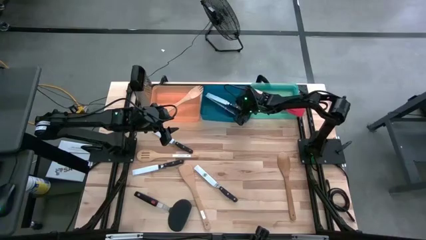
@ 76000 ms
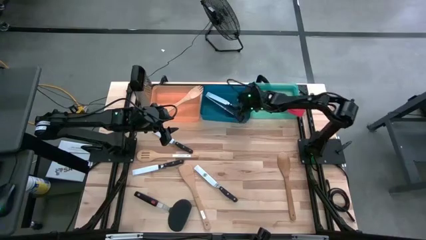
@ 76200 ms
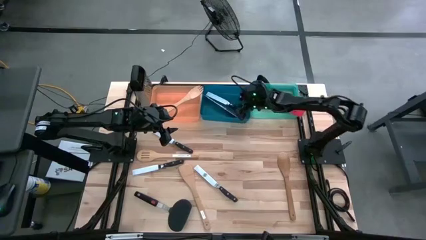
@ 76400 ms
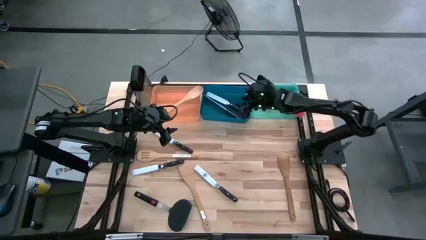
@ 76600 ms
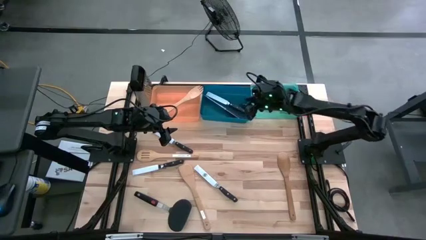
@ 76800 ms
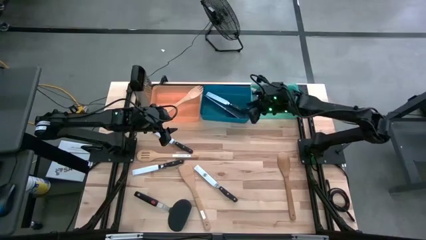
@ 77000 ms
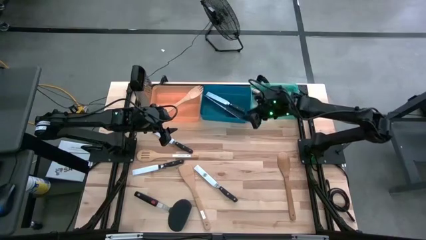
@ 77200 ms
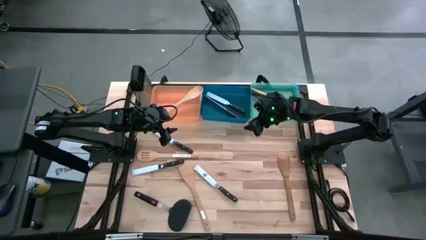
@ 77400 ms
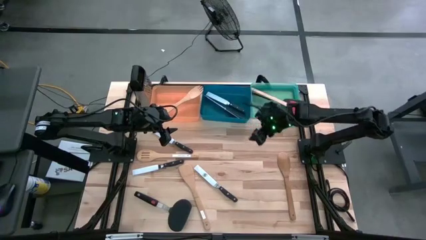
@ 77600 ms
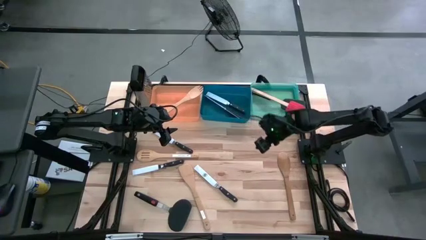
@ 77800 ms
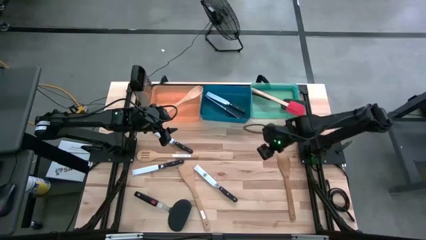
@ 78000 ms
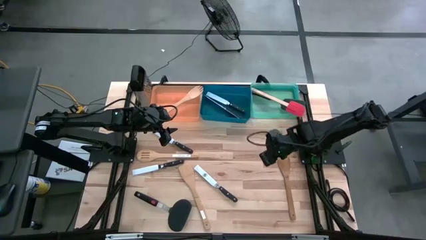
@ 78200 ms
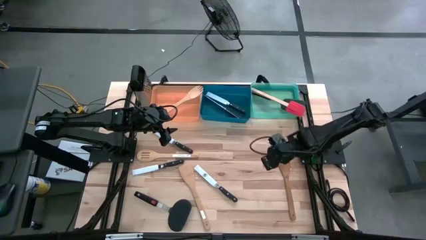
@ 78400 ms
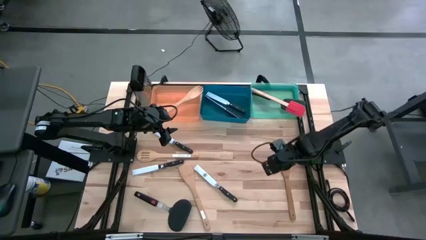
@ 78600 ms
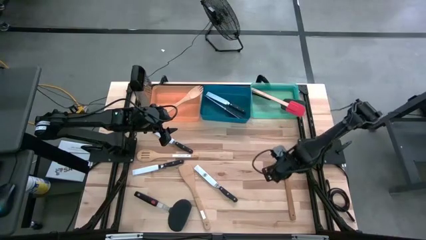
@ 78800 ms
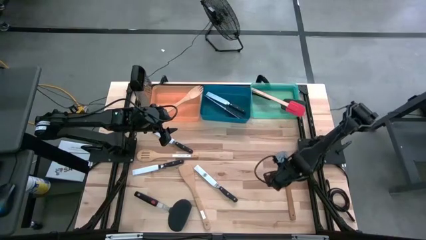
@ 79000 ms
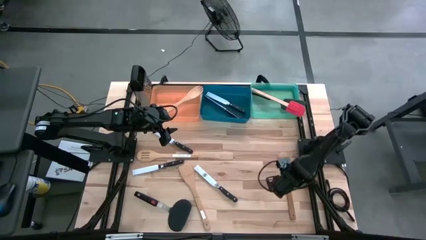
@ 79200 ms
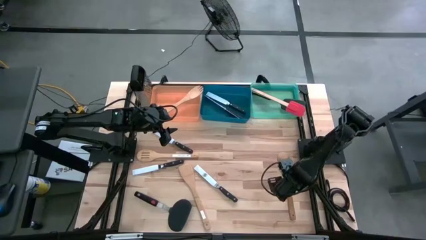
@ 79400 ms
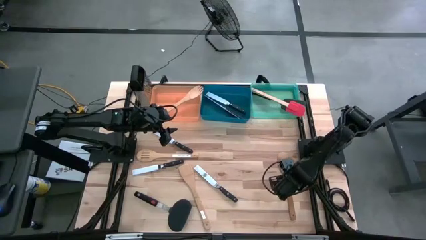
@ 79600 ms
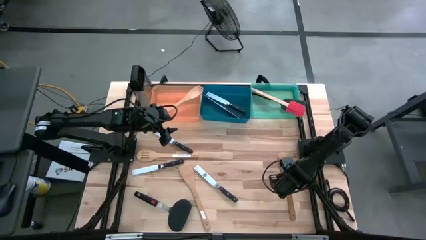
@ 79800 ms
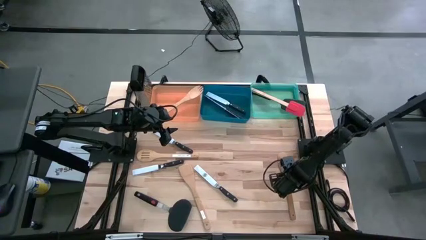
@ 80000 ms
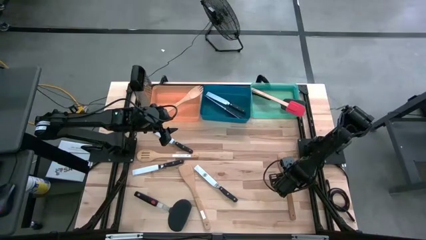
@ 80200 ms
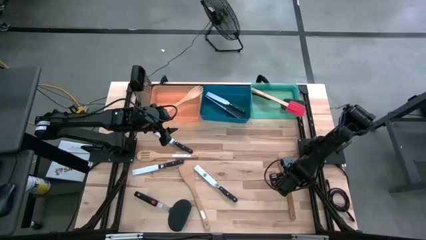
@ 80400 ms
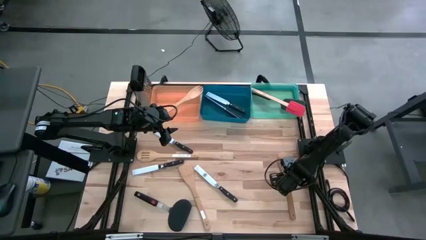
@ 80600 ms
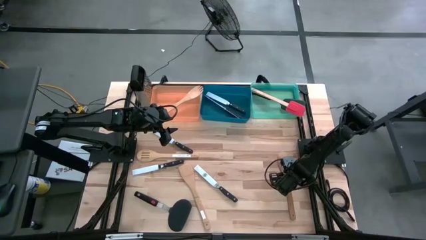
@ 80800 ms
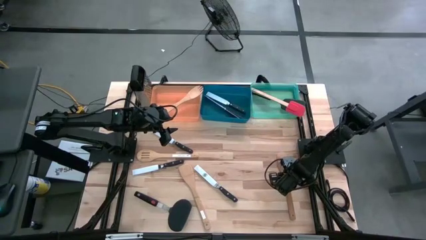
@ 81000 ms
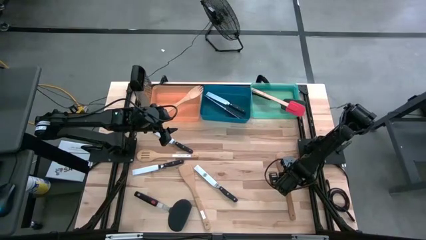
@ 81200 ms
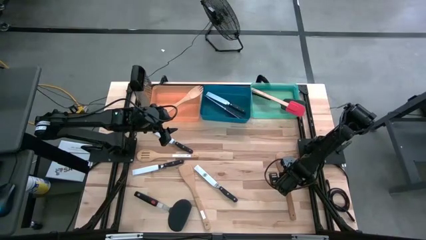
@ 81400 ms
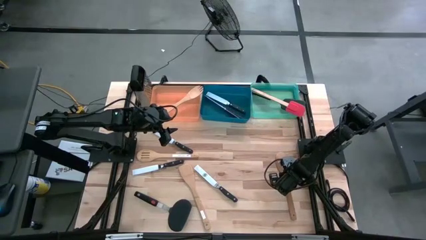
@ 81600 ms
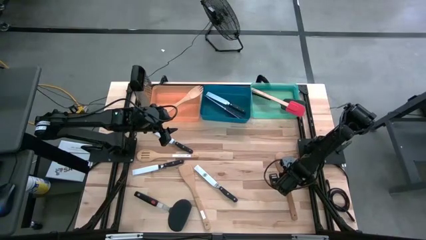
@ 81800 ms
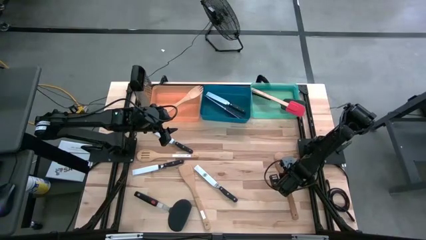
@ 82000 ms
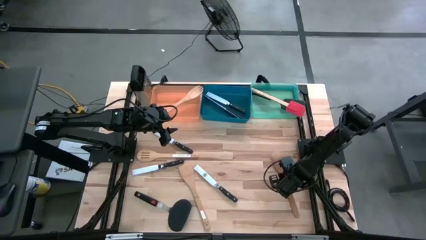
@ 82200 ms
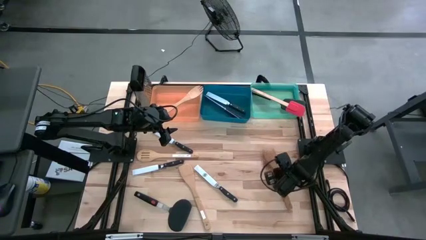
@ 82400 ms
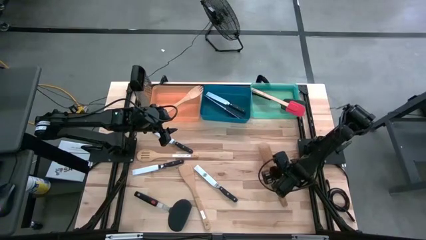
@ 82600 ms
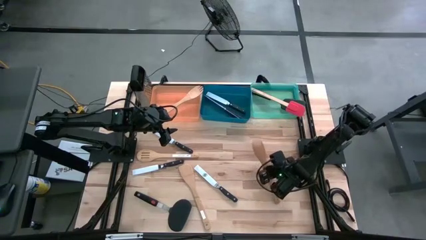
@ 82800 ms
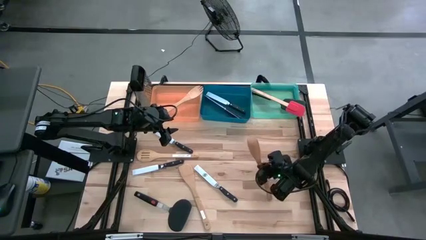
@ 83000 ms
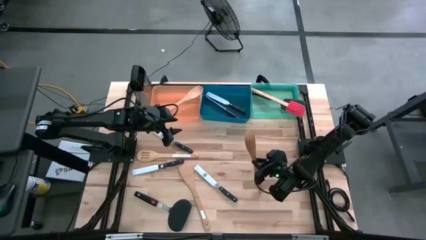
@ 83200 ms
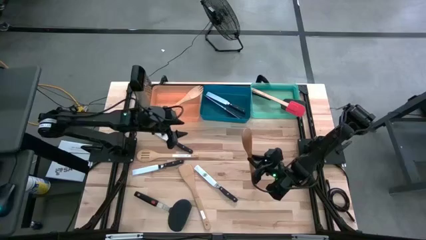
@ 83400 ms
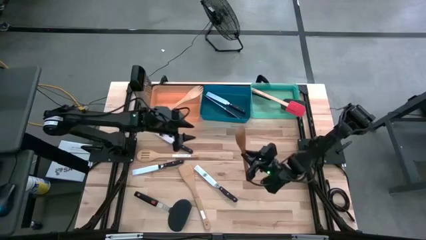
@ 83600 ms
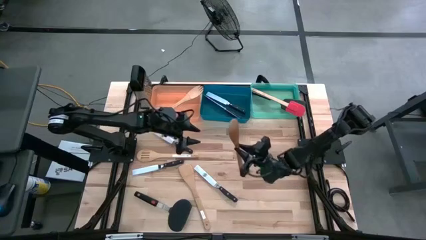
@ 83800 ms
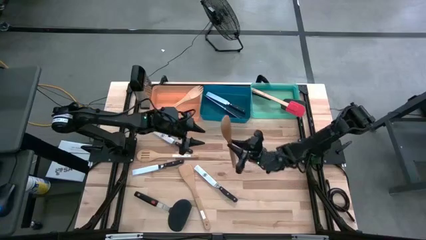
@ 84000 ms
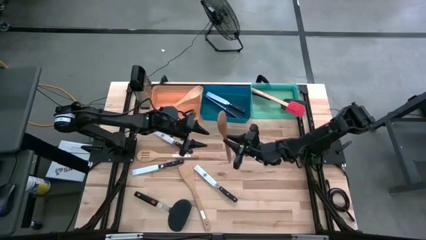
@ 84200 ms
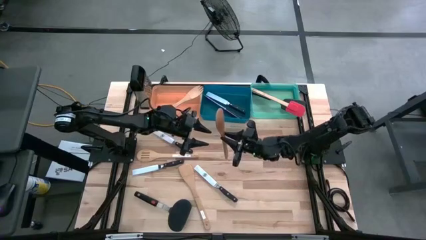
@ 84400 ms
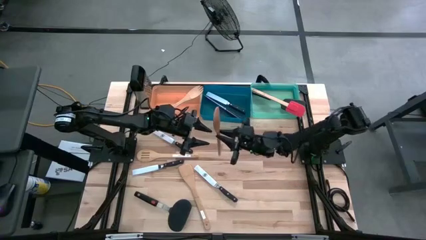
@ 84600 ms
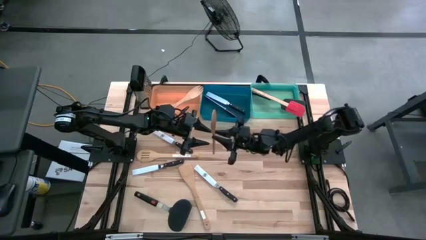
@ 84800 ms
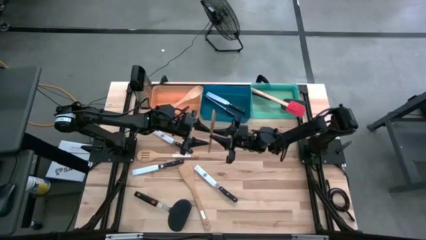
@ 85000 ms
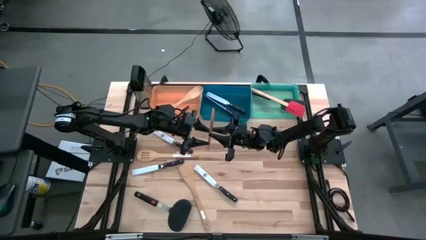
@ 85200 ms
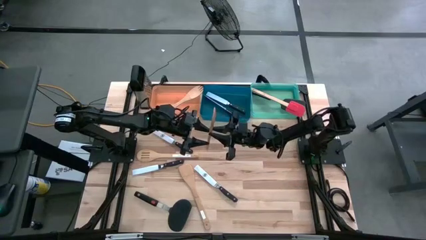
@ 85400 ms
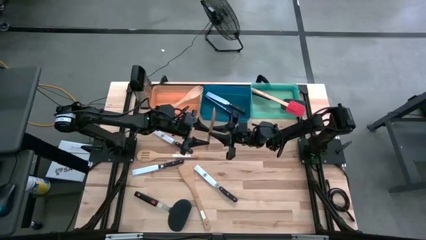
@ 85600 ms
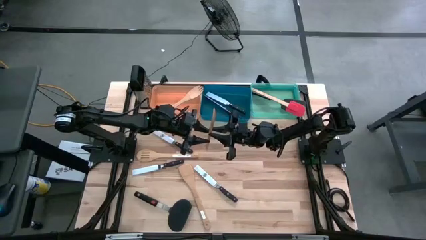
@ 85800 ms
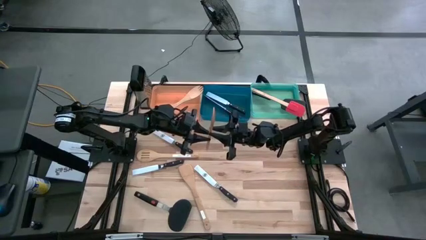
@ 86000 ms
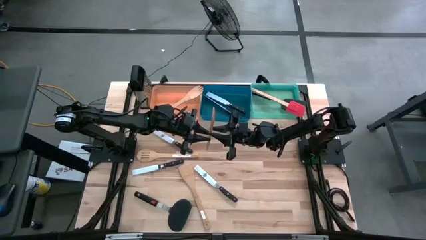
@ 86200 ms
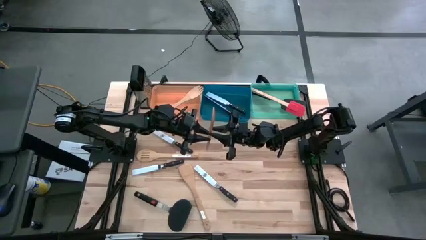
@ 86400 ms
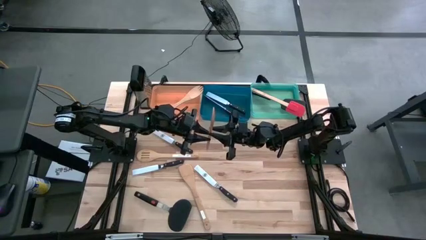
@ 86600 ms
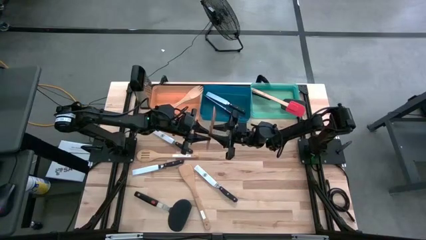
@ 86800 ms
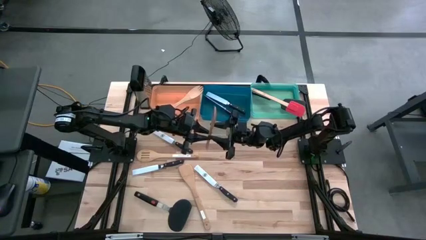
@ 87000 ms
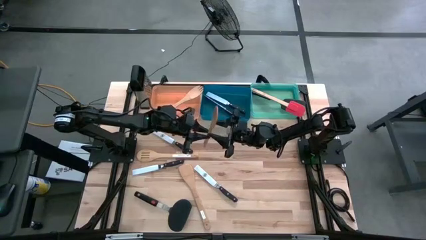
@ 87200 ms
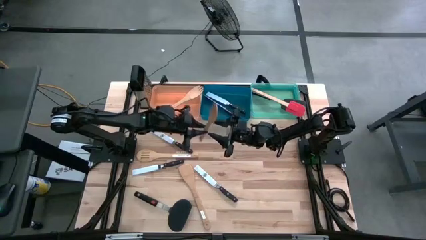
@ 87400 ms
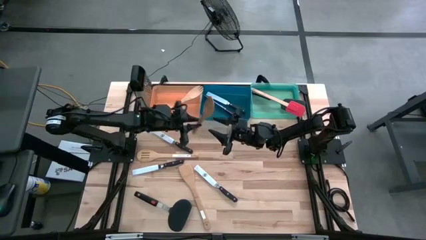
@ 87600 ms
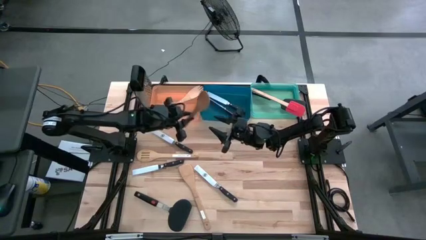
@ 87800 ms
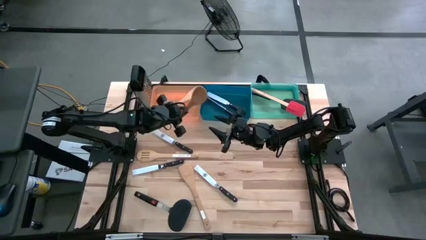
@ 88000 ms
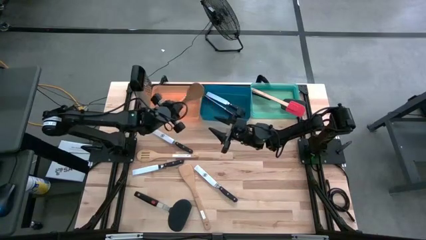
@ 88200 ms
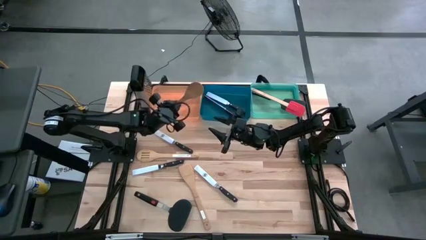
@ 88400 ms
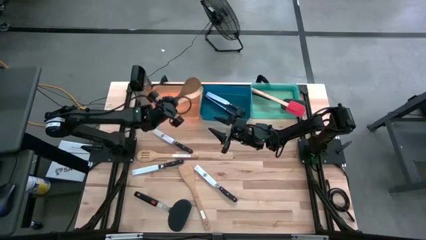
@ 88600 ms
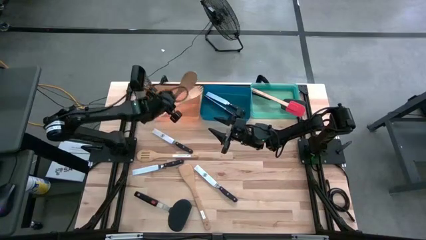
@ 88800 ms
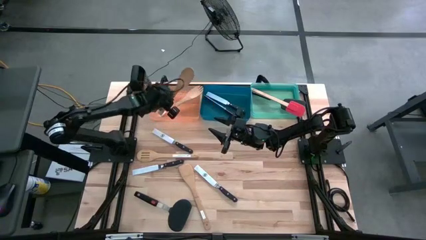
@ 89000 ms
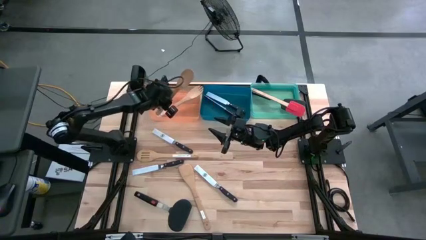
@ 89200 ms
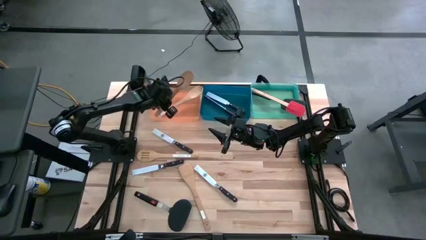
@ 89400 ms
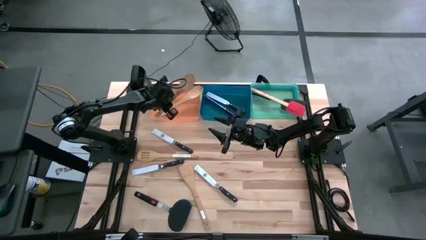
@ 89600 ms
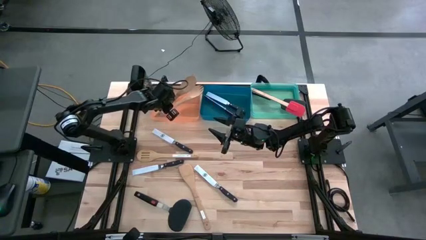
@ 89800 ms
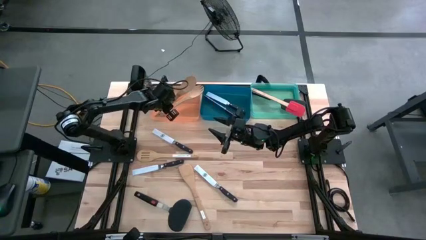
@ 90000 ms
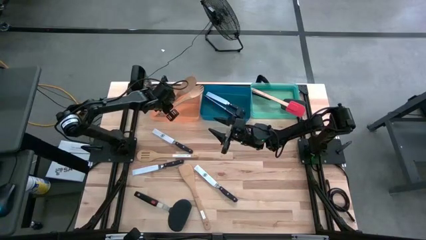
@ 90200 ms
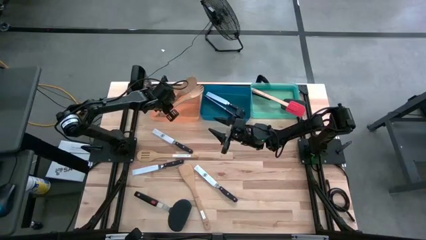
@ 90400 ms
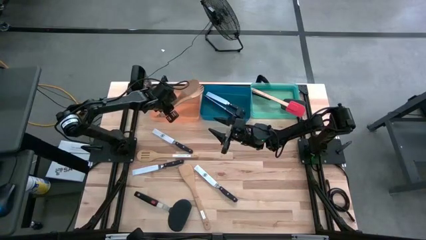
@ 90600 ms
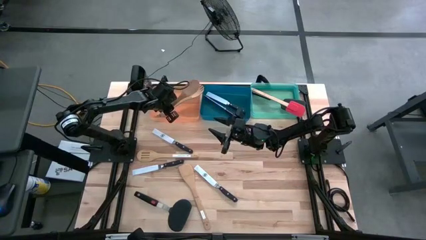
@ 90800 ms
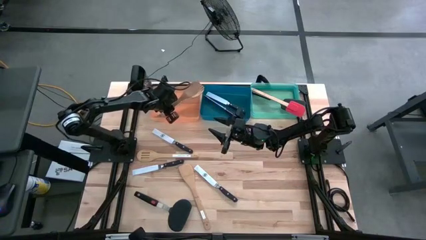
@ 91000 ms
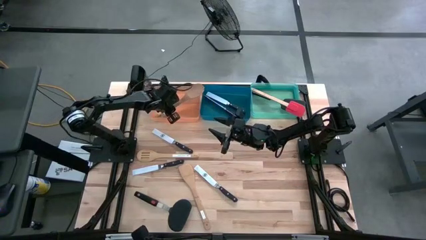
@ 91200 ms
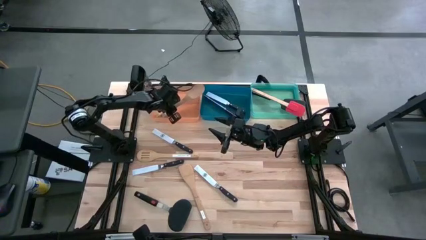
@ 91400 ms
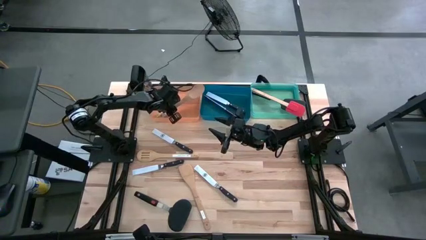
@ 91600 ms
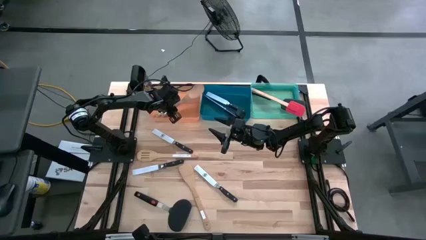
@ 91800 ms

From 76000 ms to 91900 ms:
Task: Pick & Place Kitchen Items
Put the wooden serving spoon into the orange bin
